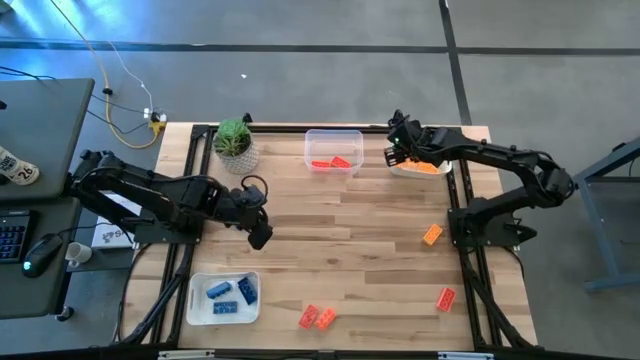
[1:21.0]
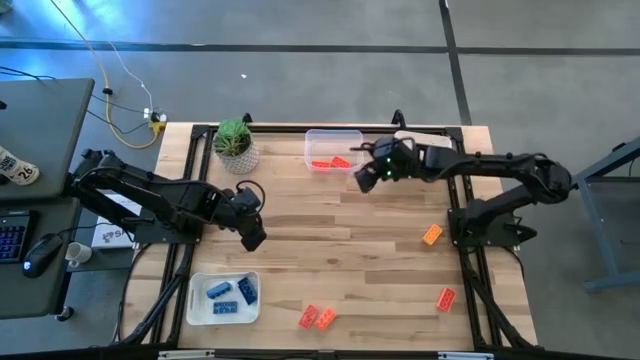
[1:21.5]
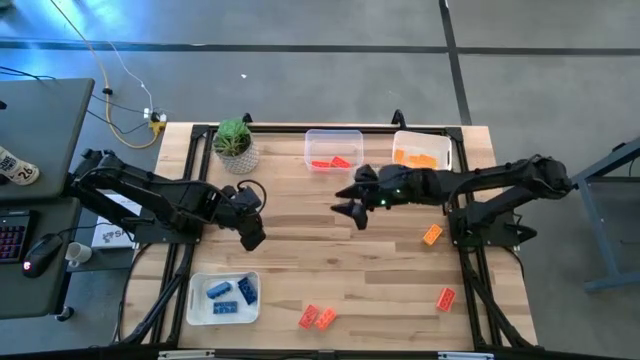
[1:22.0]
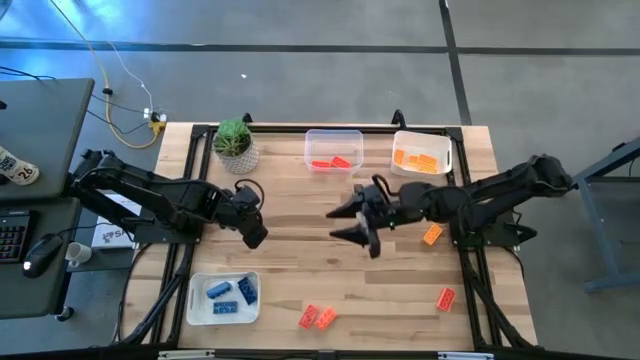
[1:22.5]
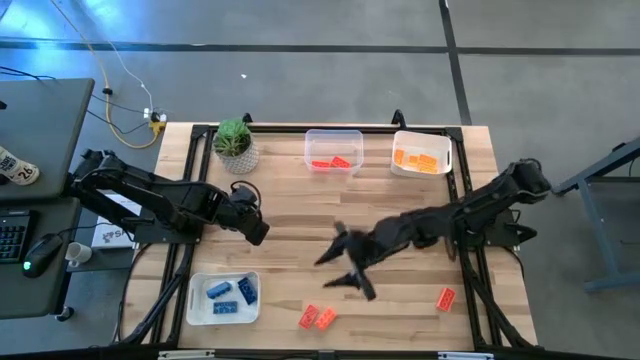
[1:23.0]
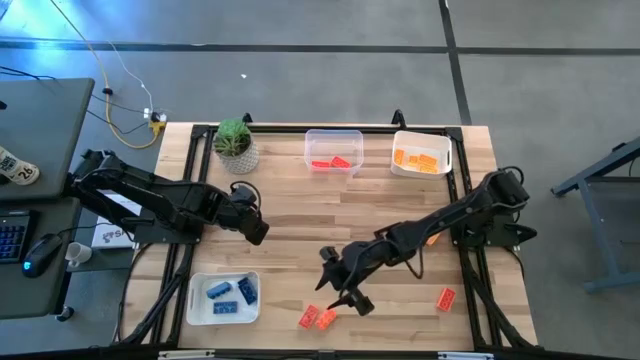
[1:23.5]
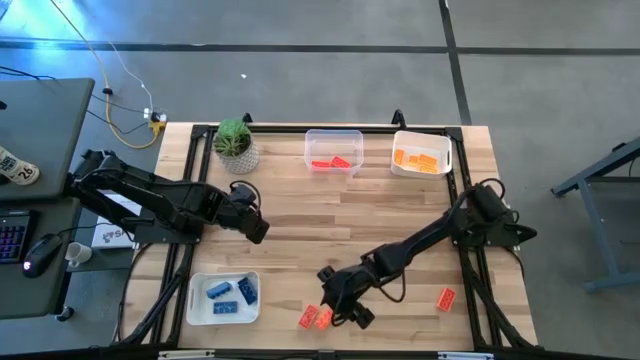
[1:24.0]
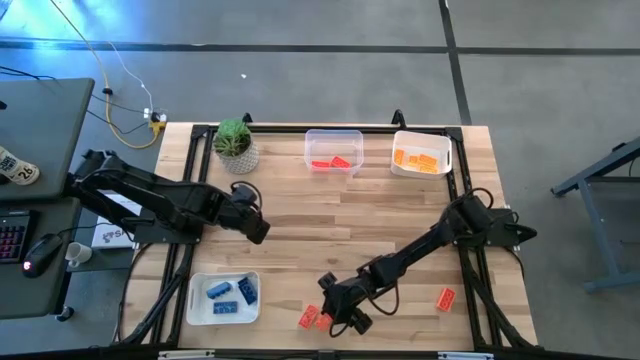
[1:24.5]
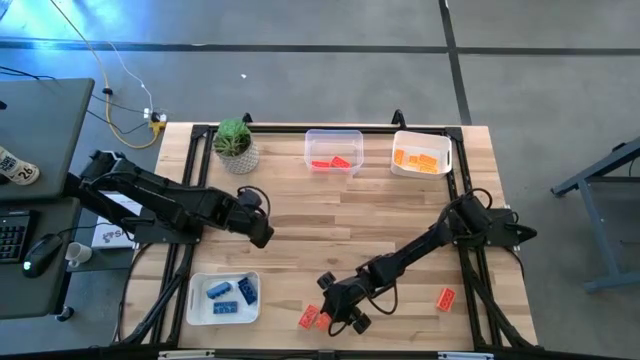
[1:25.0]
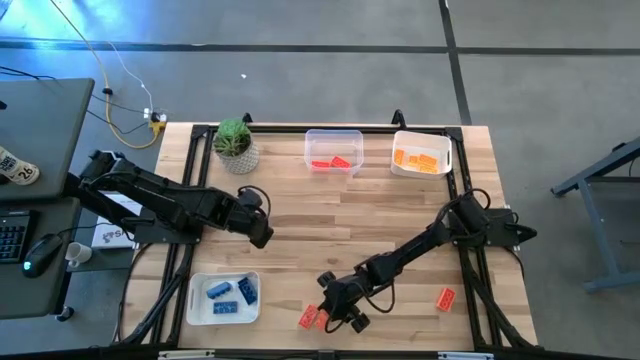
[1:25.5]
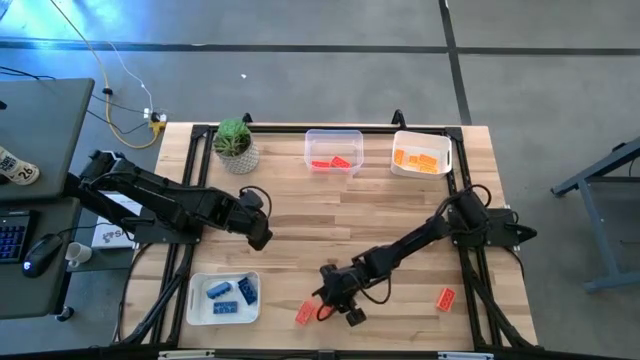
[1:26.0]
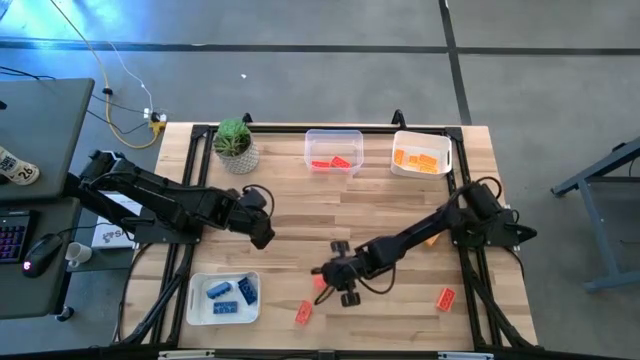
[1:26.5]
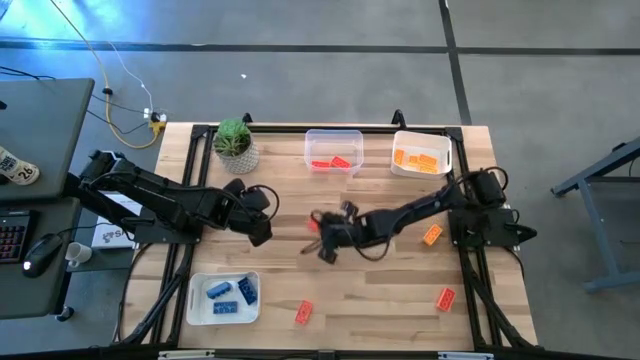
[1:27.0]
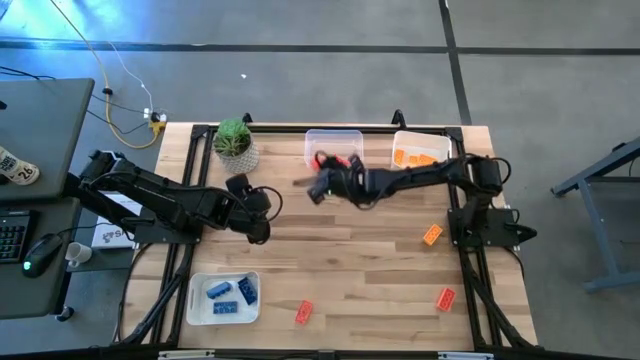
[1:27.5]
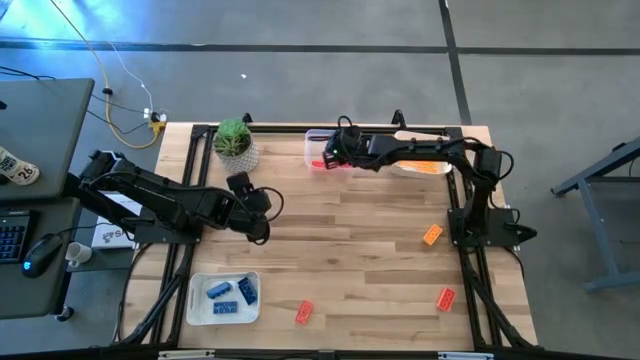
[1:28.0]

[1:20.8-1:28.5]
Task: Sort & place blocks by color
Put the orange game piece into the transparent bin

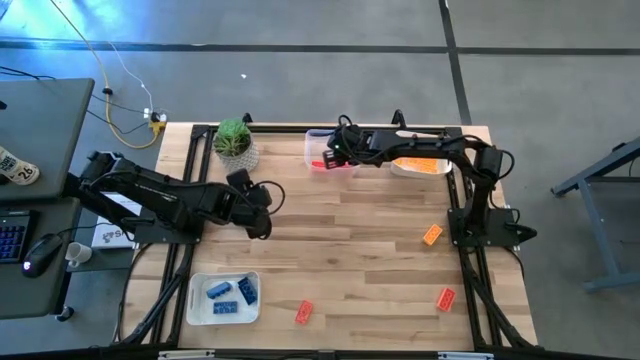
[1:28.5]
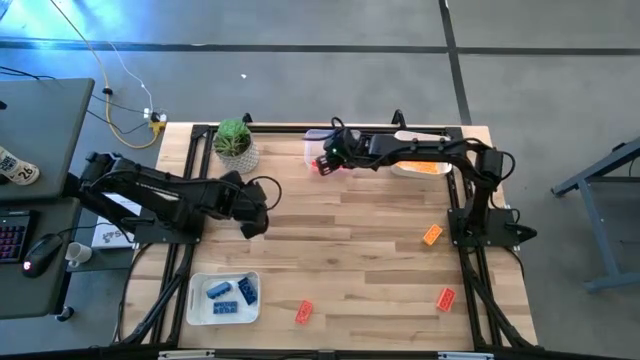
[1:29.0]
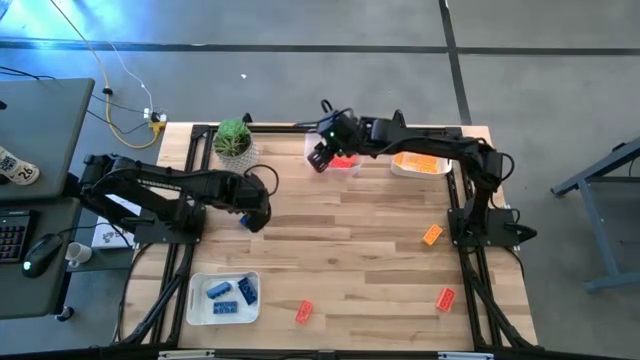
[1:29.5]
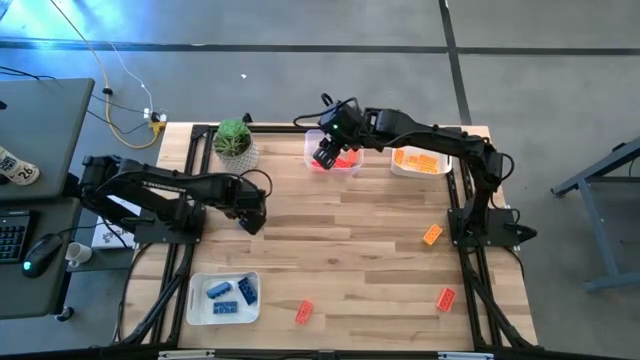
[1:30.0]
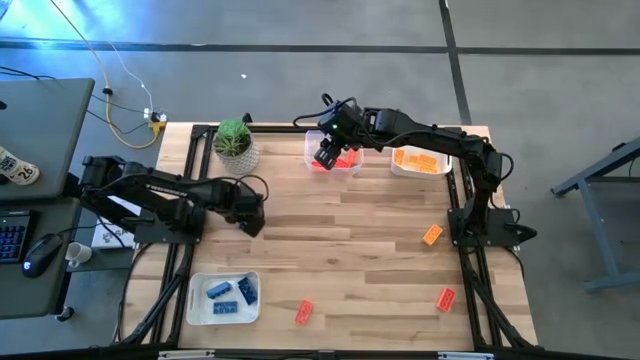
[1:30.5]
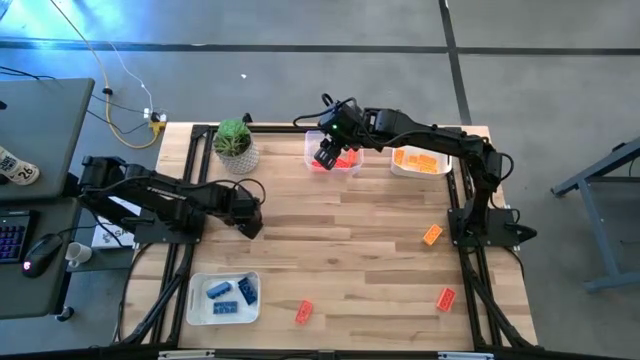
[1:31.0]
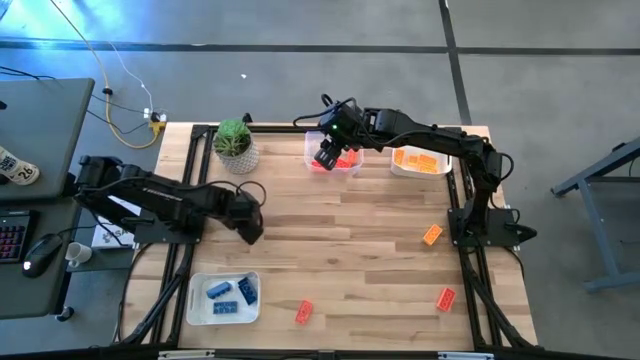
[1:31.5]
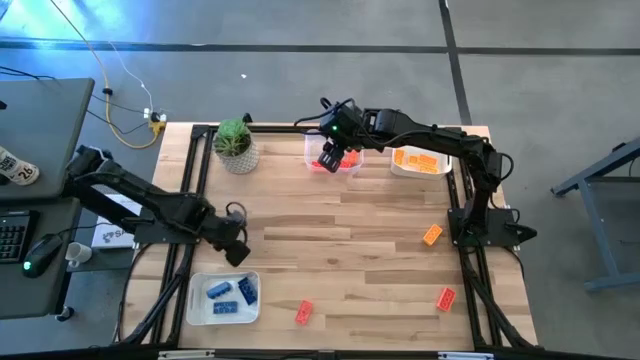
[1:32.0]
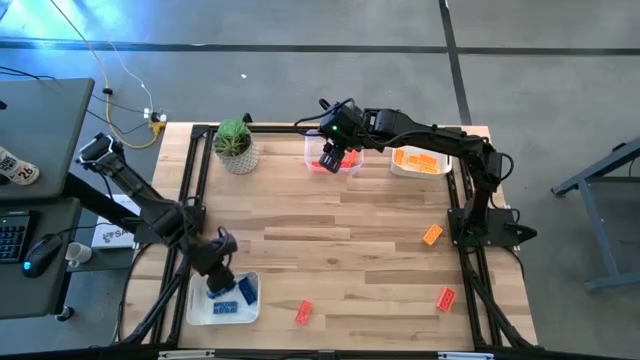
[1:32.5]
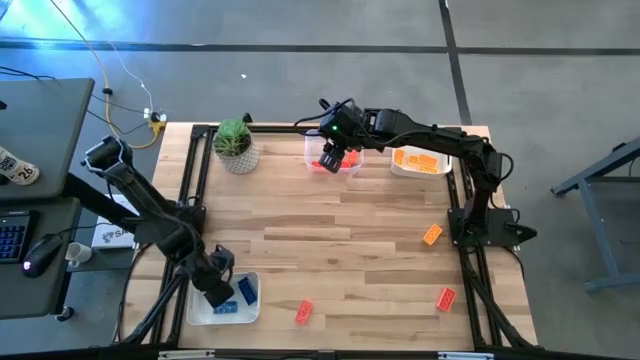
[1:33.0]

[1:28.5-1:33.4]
Put the blue game piece into the bottom white bin

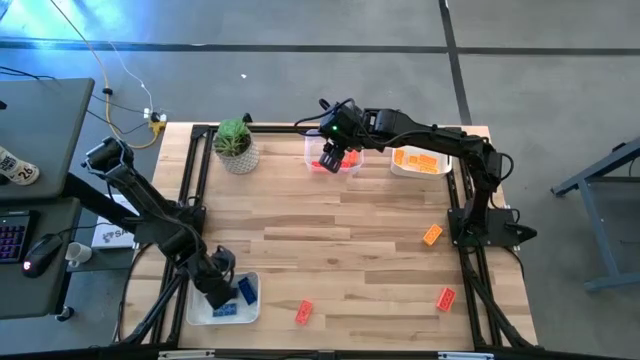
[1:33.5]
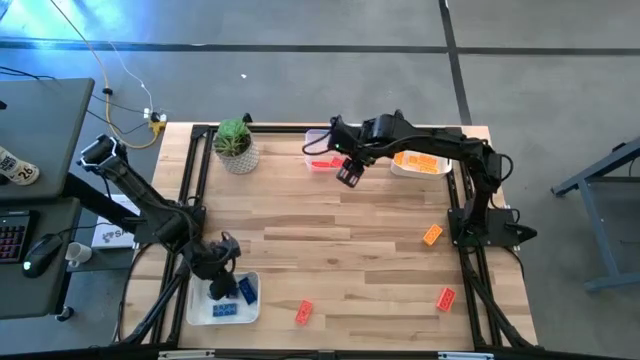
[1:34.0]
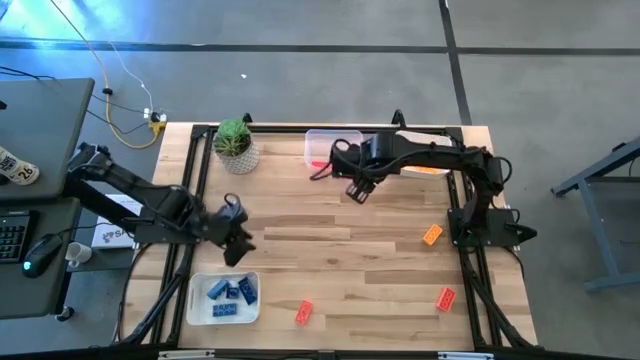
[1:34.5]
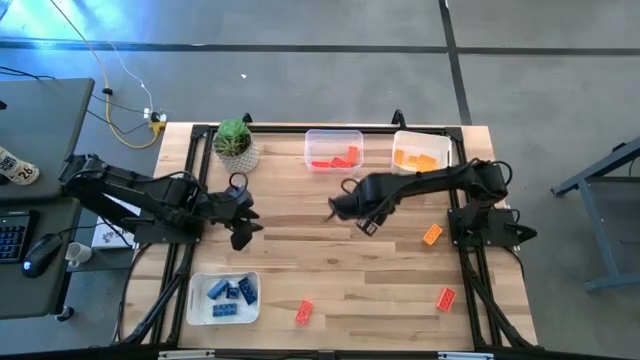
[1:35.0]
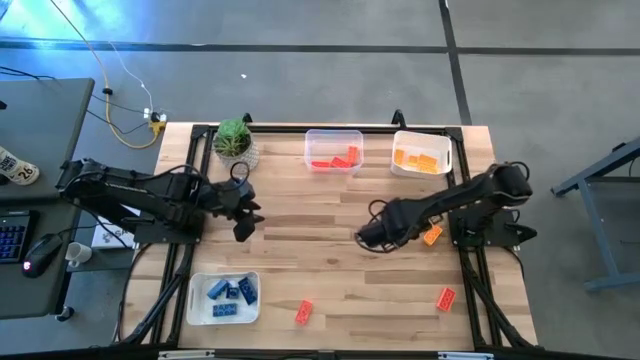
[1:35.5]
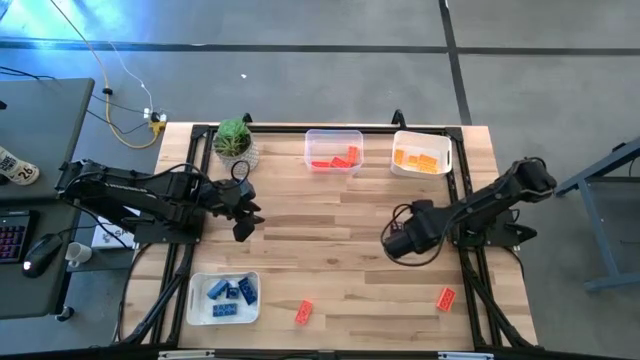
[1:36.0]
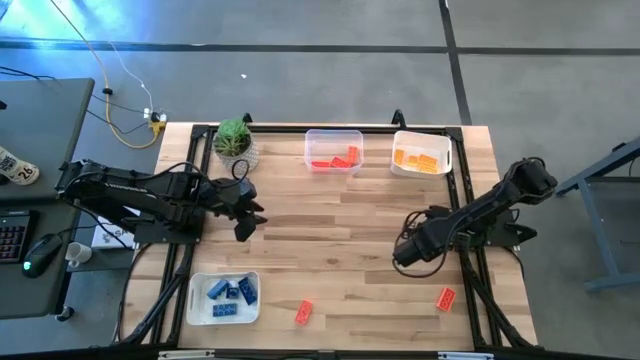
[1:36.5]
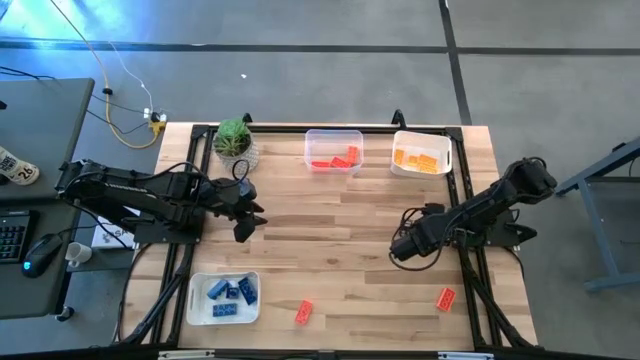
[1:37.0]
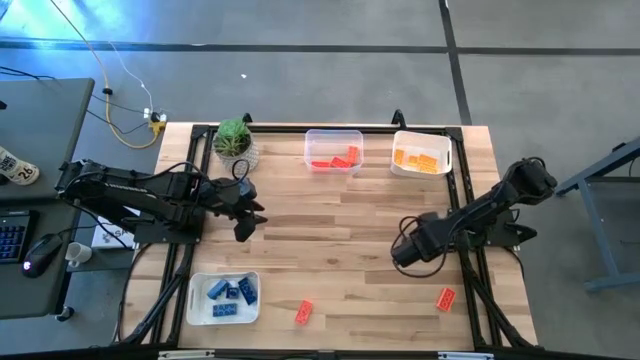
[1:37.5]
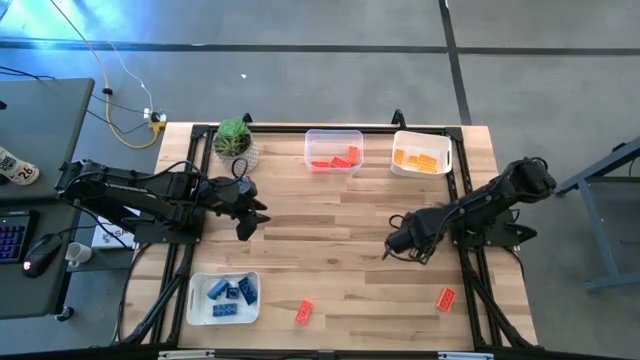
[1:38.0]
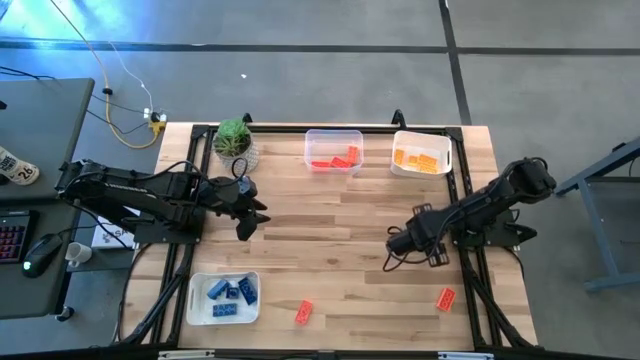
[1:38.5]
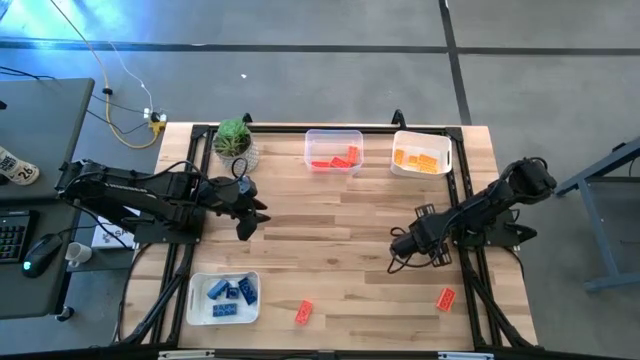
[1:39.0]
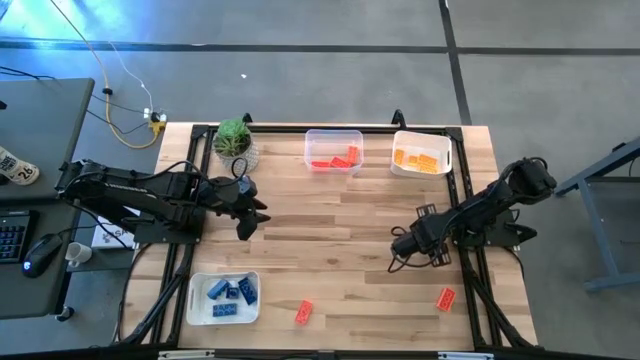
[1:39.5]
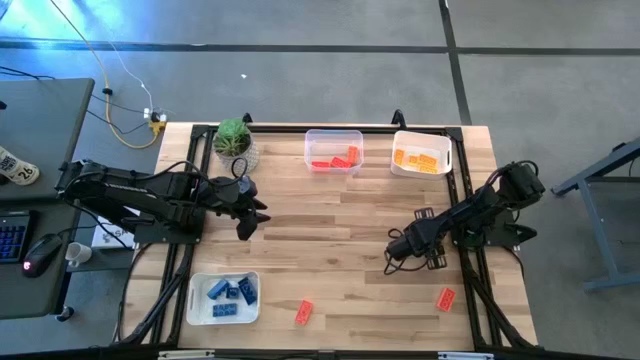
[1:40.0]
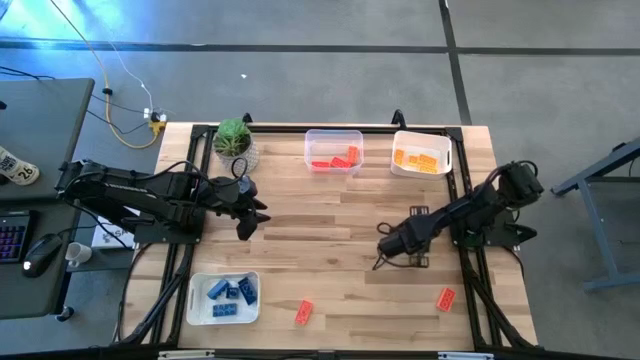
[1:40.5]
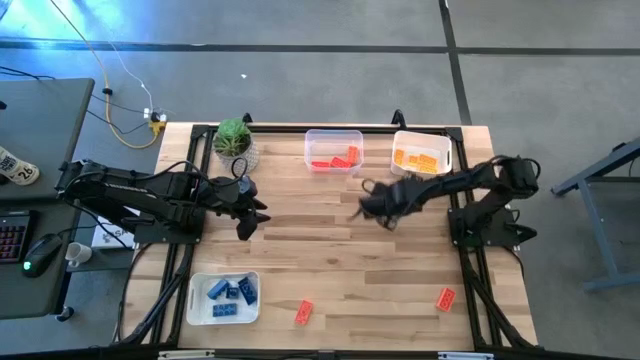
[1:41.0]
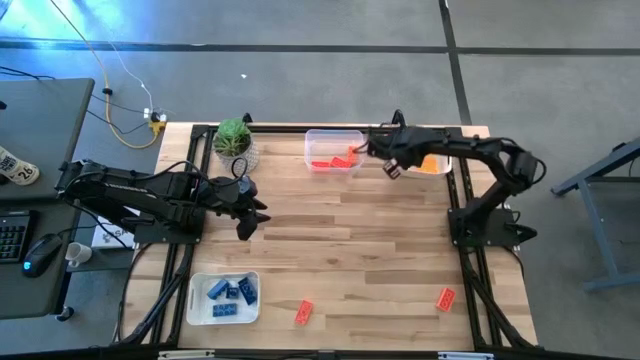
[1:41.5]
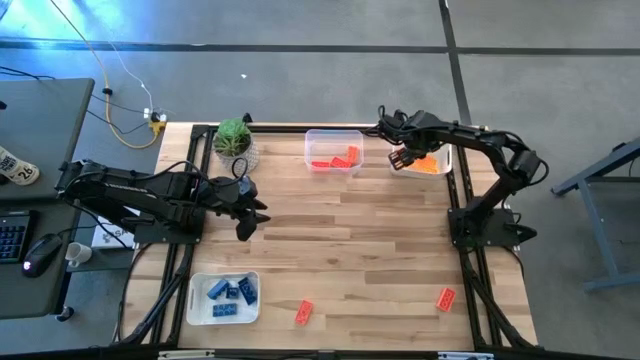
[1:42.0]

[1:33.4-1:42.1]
Put the yellow game piece into the top white bin
